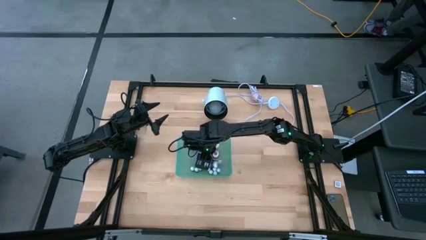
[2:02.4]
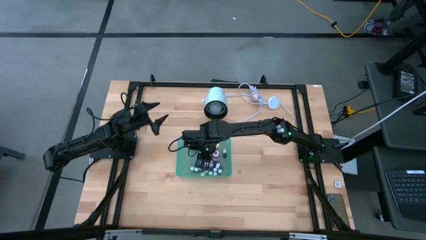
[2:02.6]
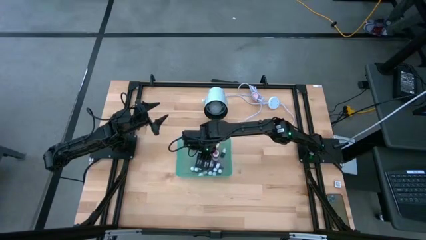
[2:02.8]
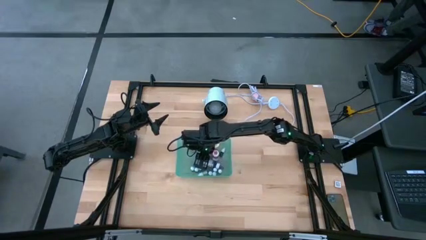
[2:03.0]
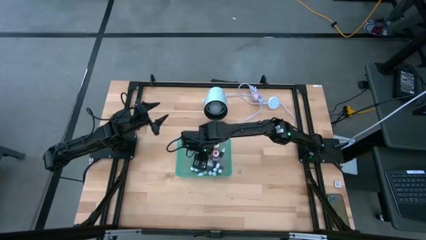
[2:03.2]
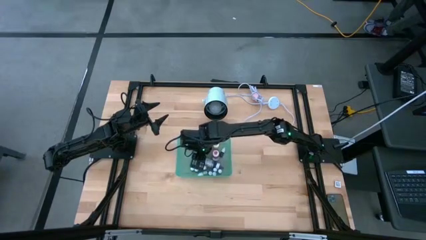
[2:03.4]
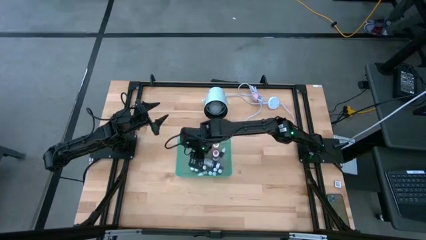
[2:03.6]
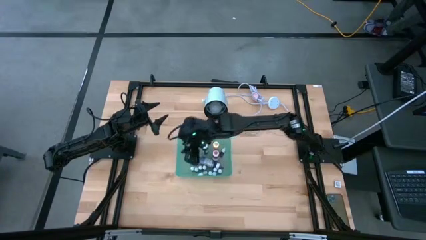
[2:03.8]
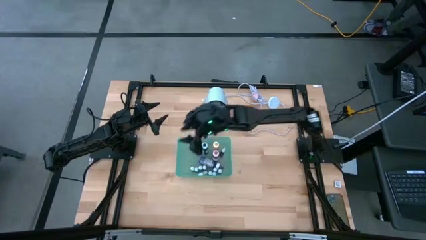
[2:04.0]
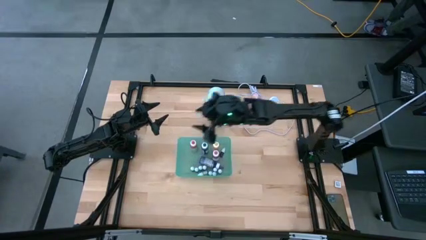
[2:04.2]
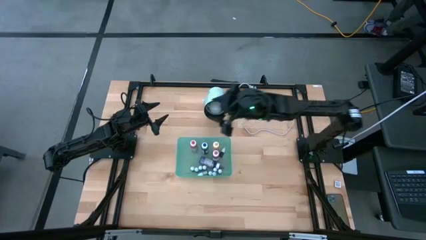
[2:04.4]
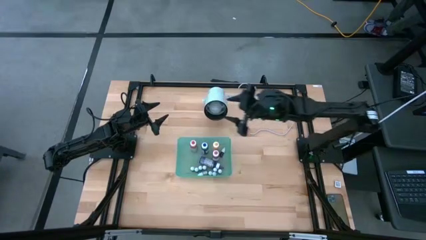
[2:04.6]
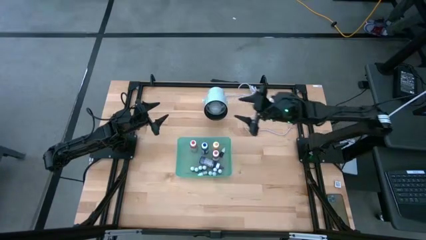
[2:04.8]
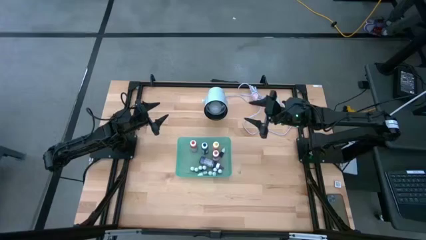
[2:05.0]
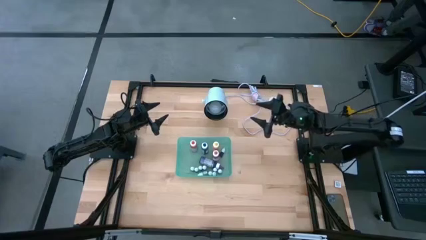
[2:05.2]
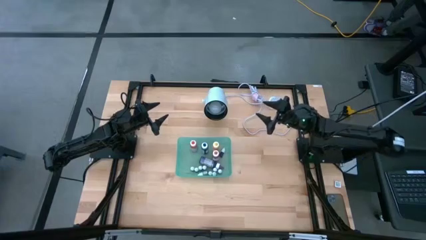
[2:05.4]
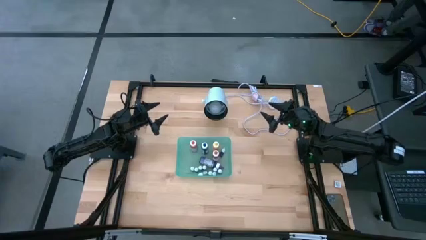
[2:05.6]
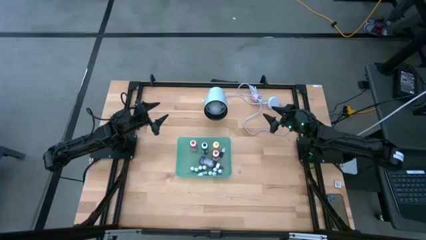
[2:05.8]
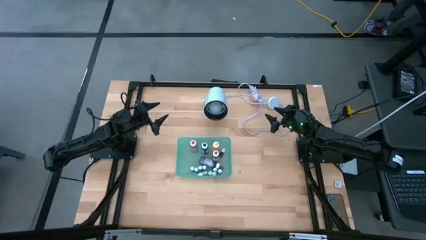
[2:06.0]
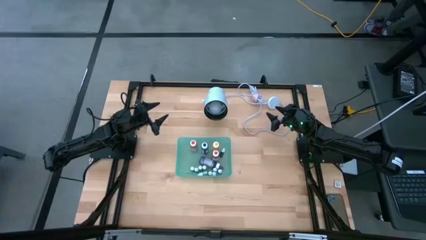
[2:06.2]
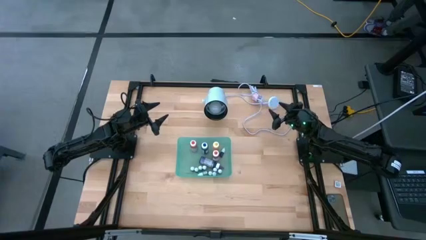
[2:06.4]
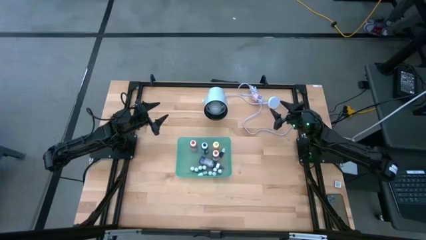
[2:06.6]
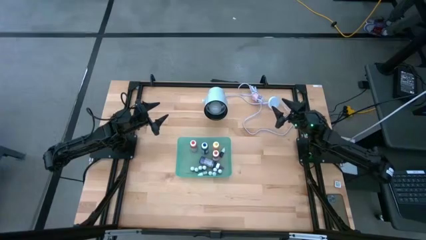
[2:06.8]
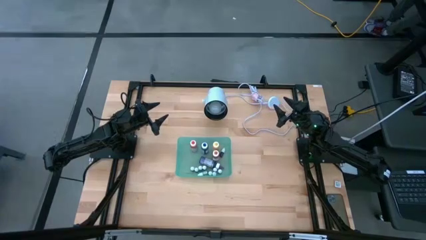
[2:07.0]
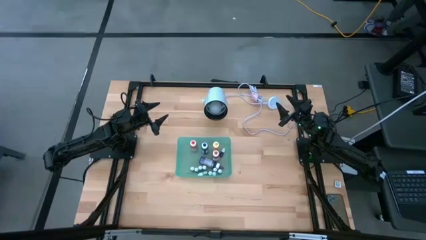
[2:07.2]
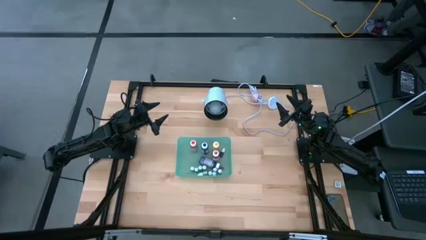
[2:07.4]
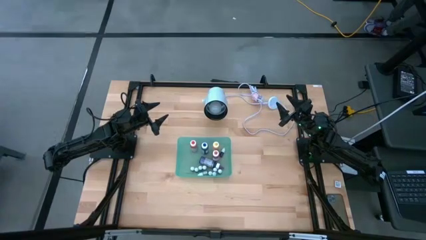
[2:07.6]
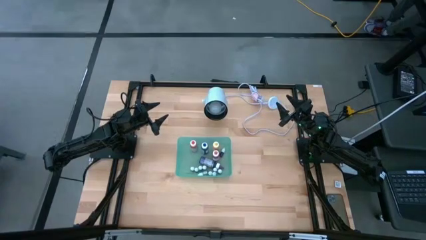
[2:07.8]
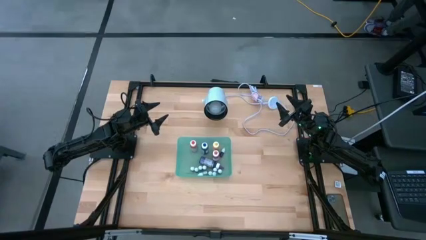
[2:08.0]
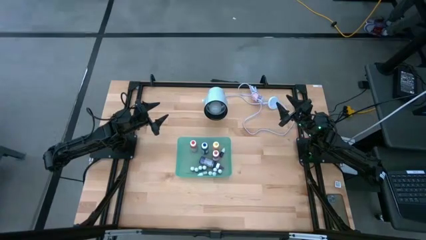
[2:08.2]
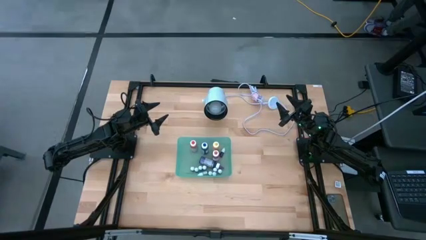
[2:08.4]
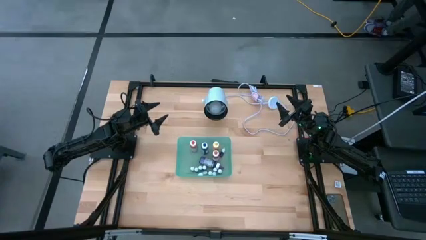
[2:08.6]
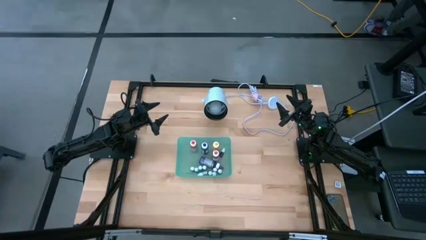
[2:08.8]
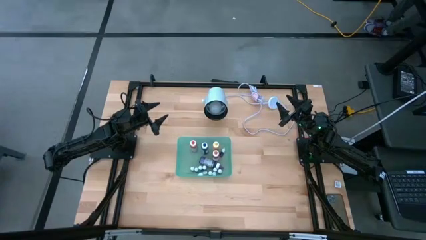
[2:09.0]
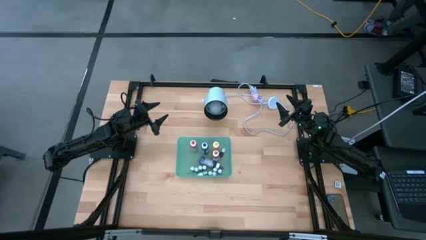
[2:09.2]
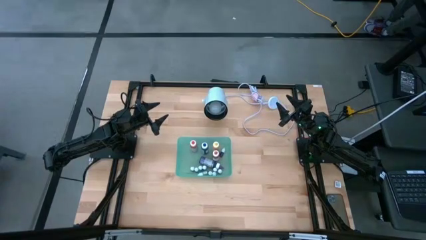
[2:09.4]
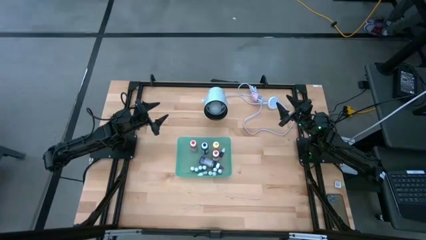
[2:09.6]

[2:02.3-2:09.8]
Task: Pick & Place food coloring
Return to Home Position

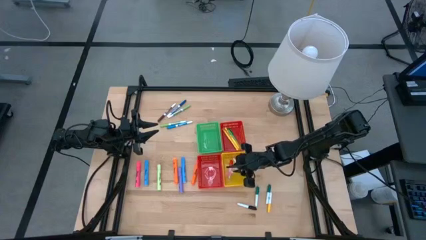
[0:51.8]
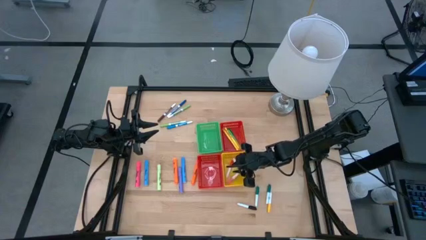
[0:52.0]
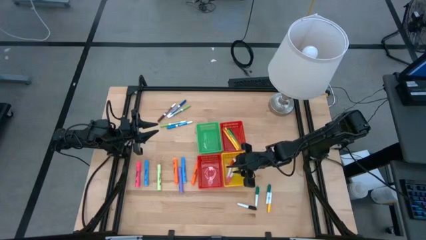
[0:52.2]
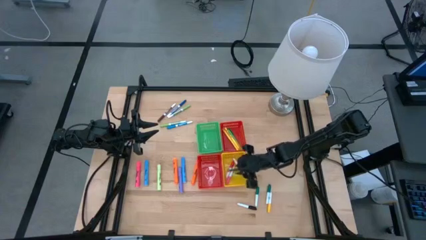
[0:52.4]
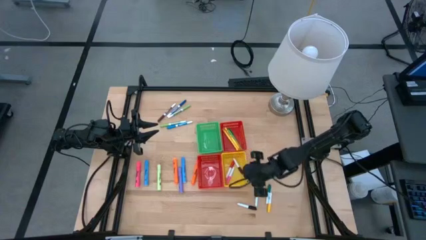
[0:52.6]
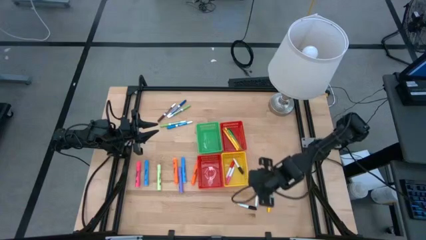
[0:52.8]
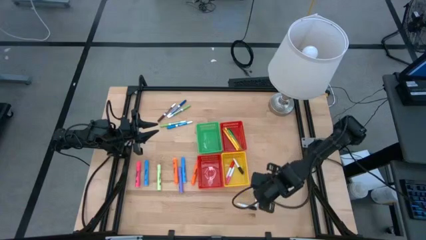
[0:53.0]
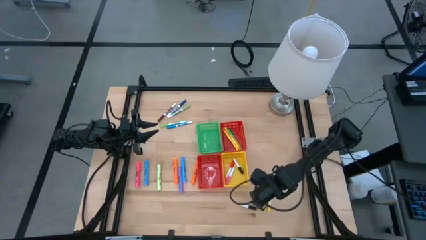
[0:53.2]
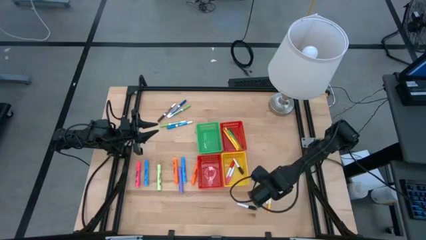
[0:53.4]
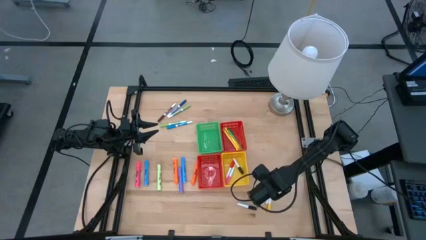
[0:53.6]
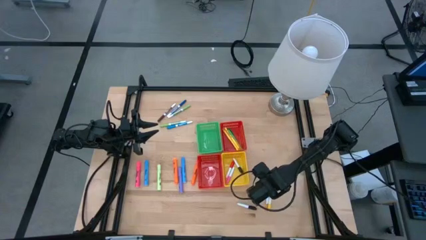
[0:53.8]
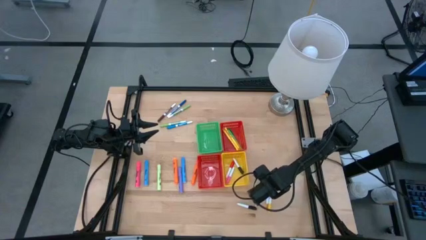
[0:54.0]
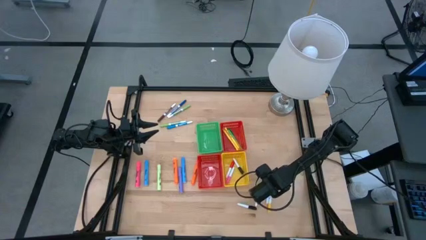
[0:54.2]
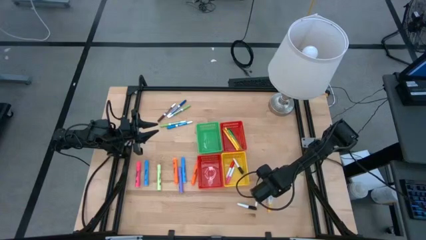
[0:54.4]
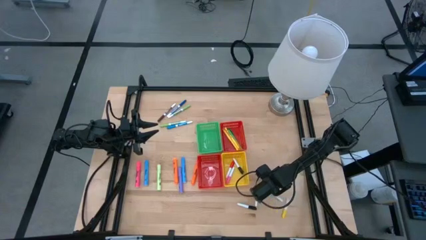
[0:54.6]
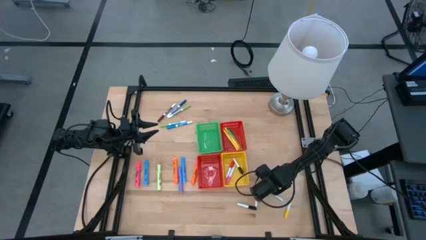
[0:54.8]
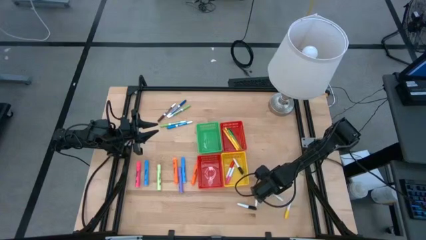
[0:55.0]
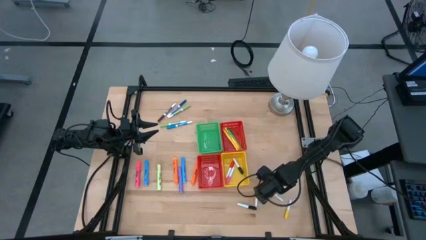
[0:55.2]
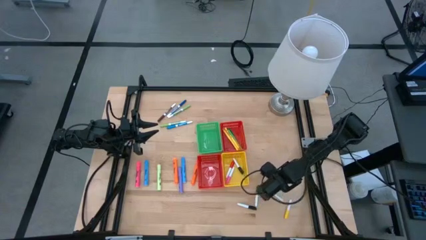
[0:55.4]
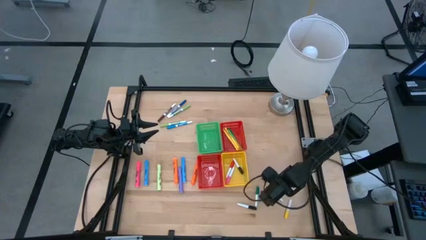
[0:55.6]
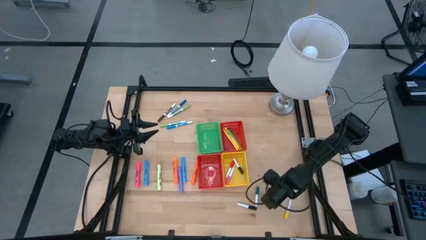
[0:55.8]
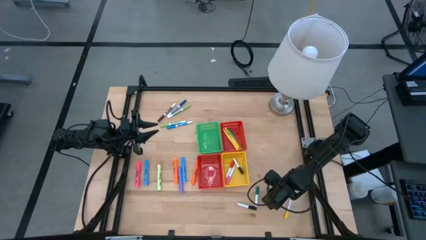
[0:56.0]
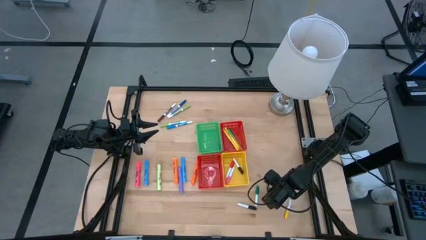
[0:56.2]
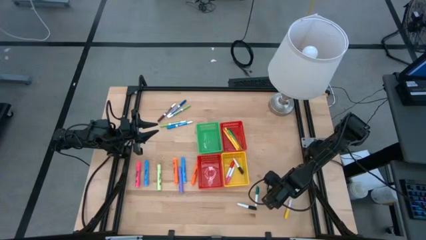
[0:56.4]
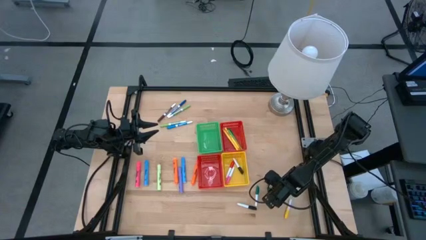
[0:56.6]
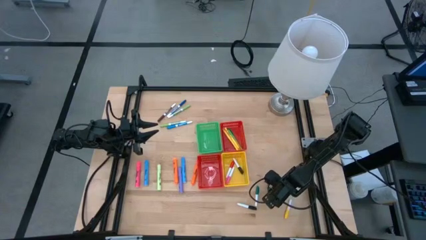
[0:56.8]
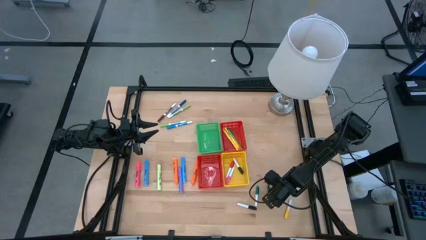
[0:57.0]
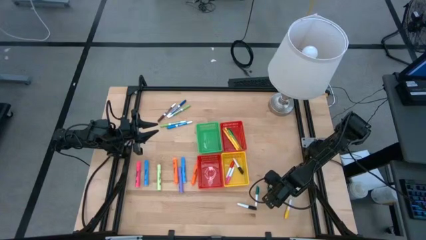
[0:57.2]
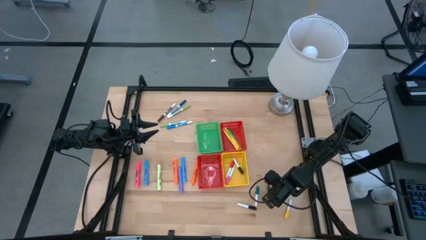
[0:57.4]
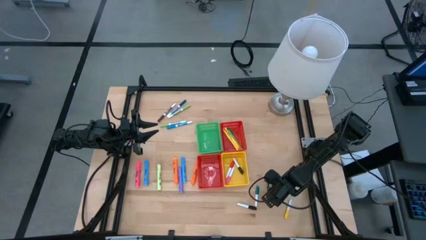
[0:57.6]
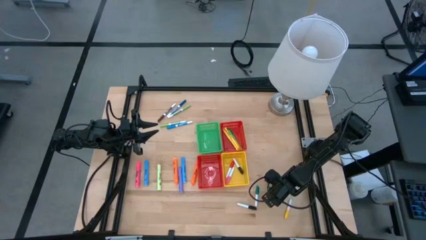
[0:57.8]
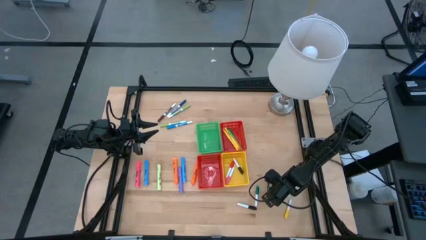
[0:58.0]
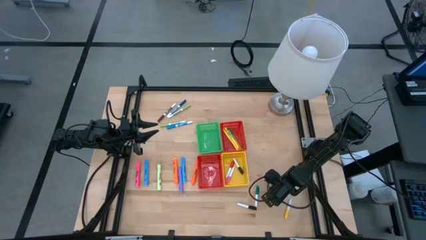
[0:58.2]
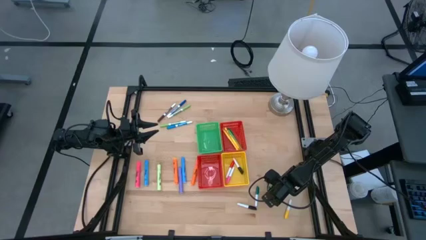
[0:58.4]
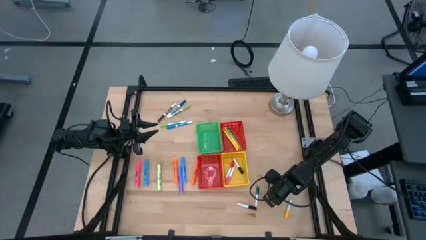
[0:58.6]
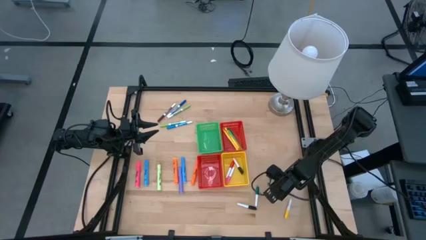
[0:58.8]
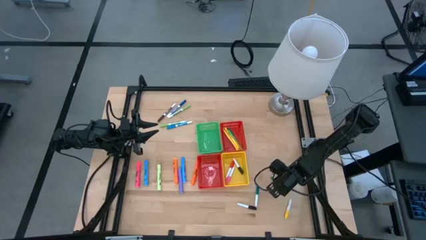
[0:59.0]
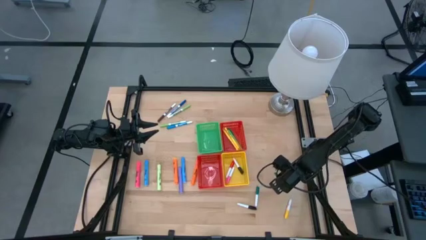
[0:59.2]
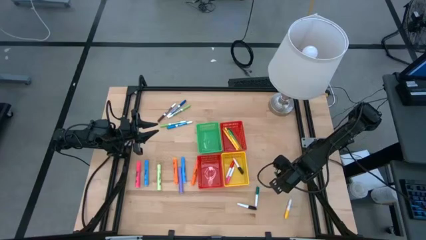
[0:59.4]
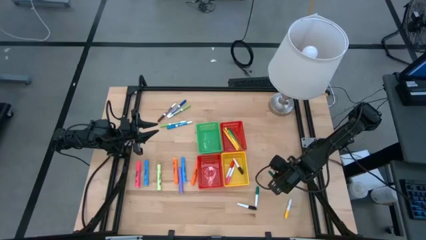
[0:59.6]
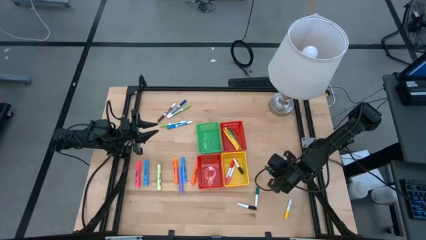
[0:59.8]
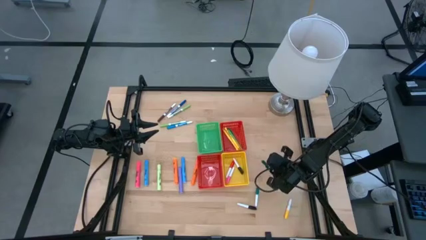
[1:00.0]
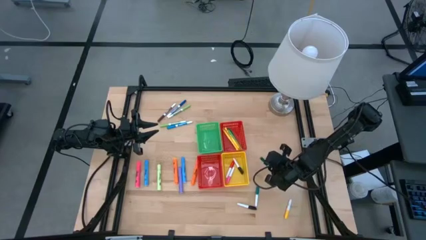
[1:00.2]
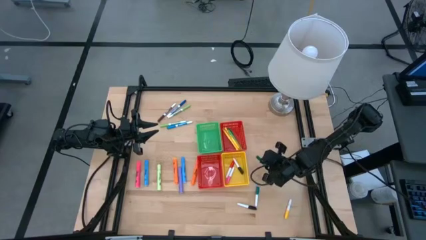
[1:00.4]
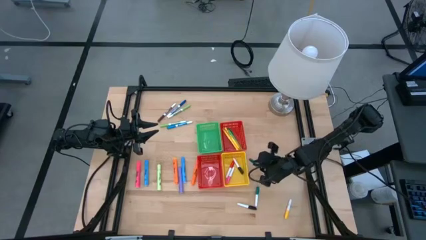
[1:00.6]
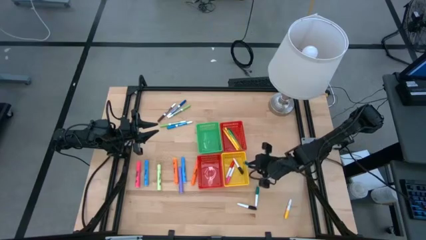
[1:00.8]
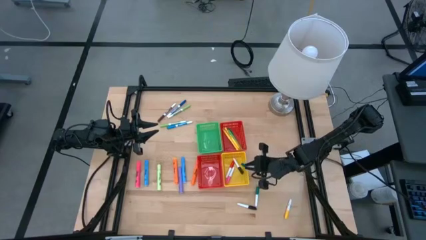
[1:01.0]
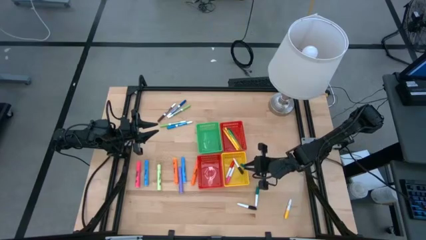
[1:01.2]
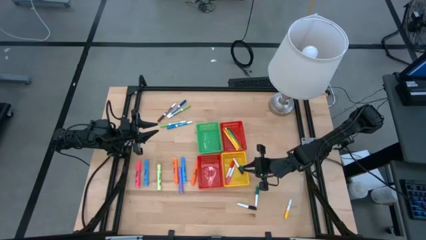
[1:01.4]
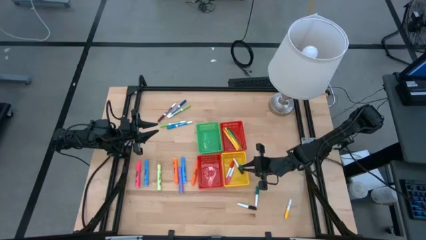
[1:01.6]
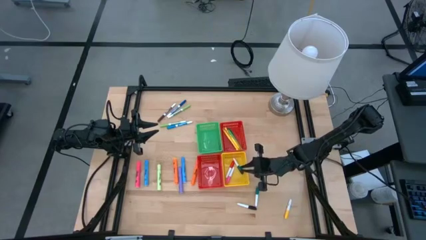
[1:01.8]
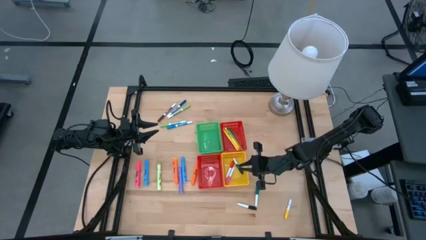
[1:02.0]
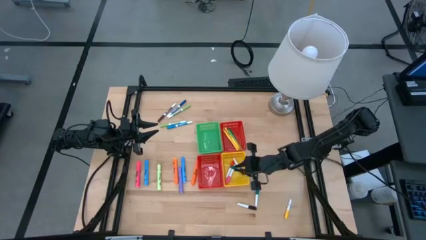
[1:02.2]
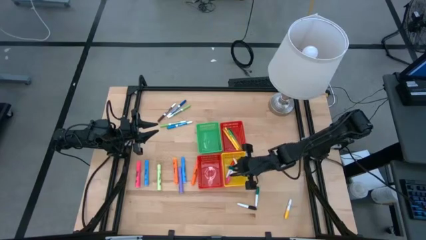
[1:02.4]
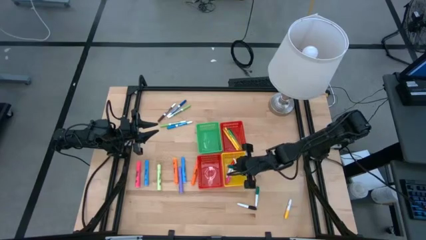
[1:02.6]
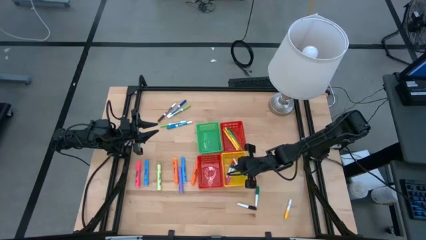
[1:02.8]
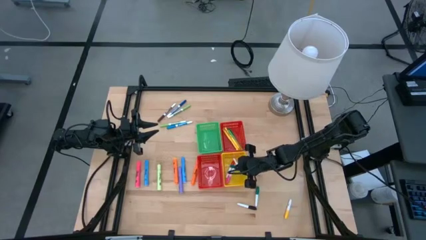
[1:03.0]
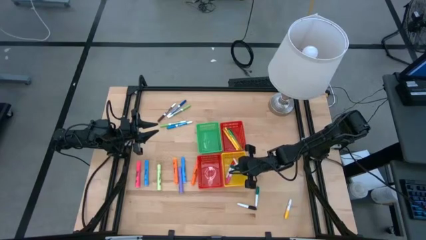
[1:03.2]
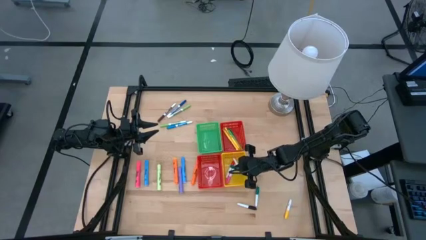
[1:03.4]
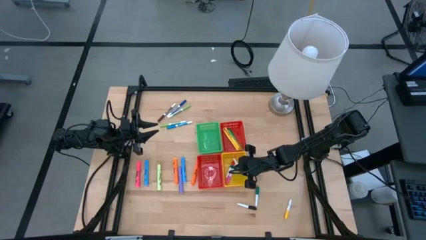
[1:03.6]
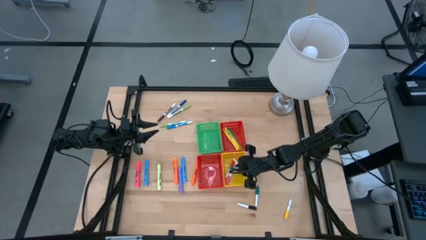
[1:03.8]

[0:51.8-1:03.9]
Task: Pick & Place Markers
Put the small green highlighter pen into the yellow bin
